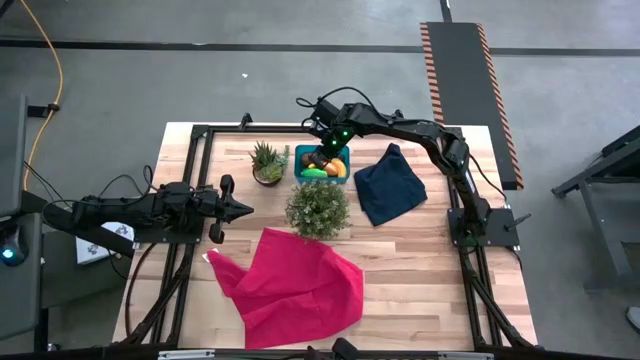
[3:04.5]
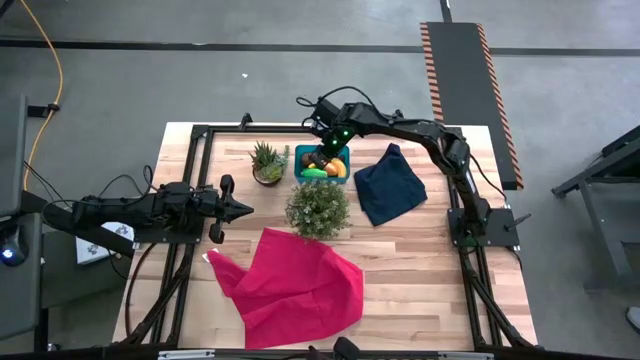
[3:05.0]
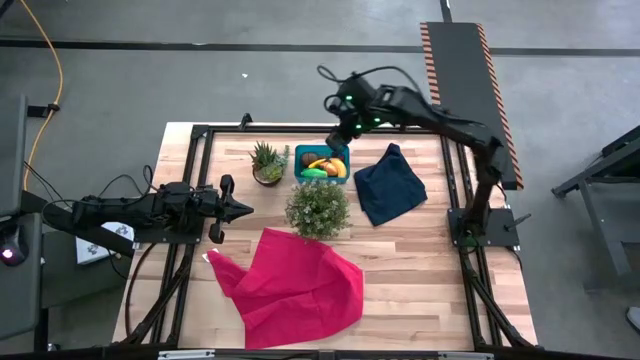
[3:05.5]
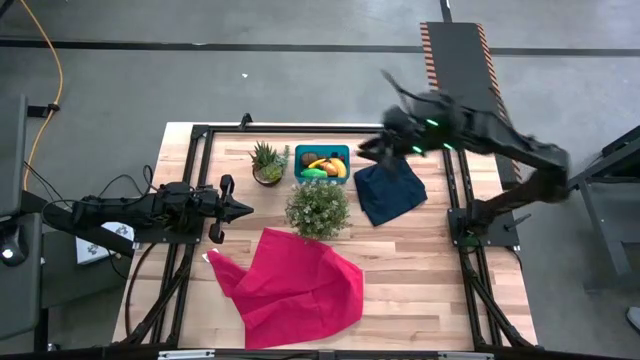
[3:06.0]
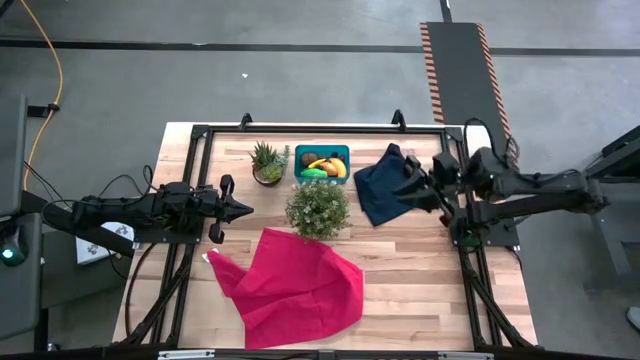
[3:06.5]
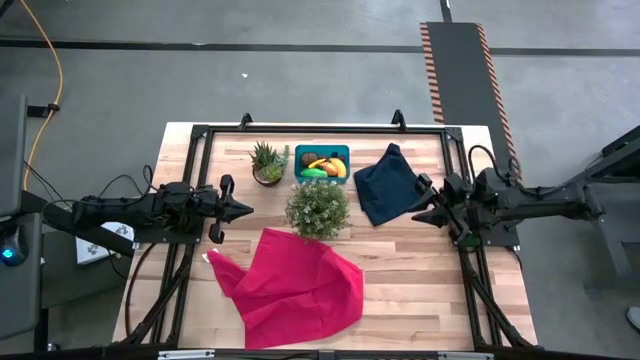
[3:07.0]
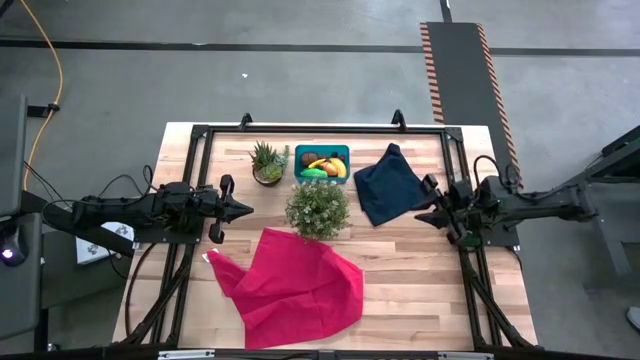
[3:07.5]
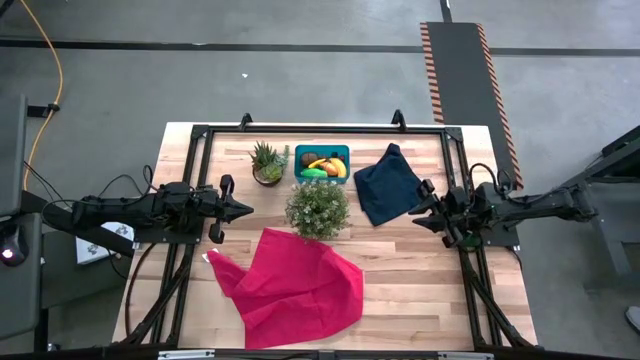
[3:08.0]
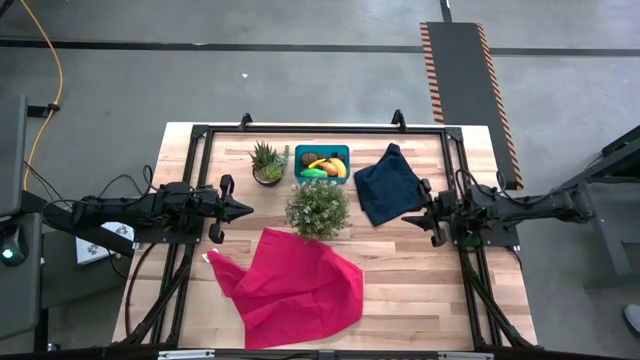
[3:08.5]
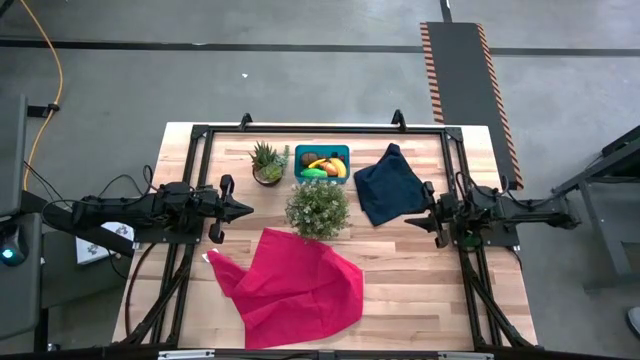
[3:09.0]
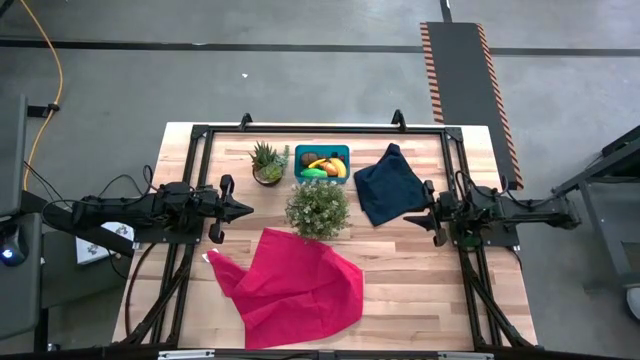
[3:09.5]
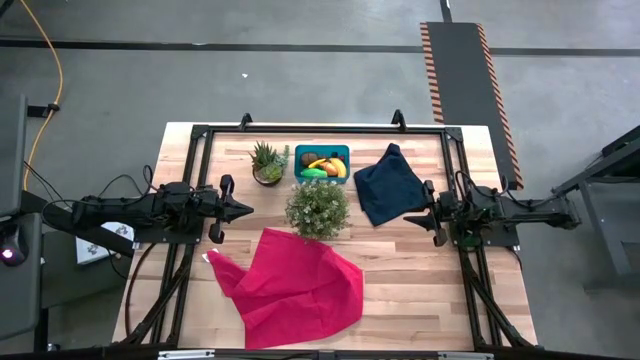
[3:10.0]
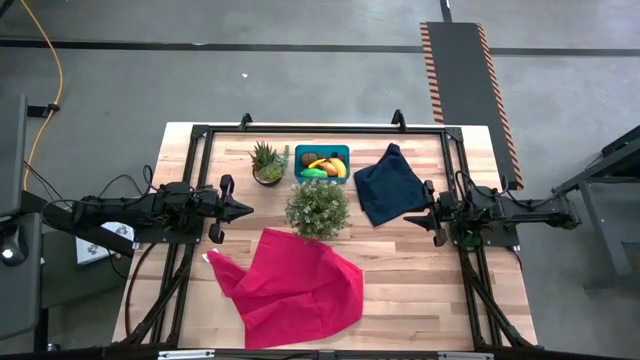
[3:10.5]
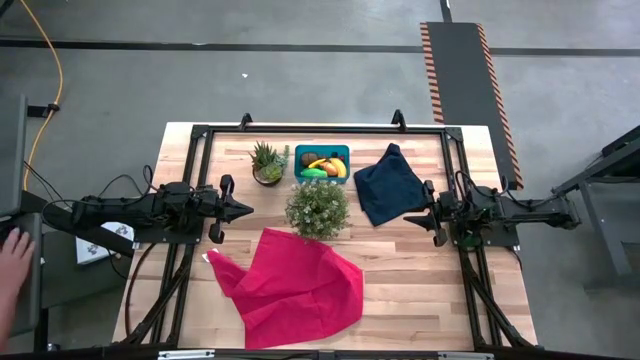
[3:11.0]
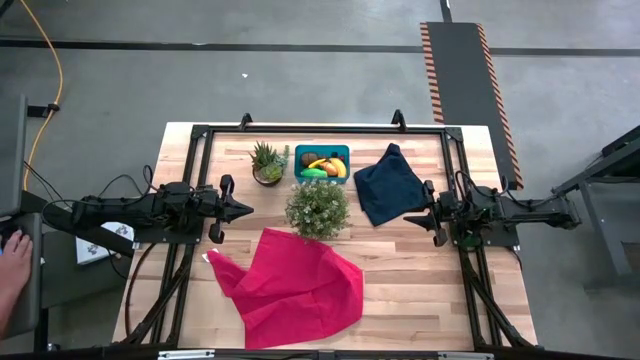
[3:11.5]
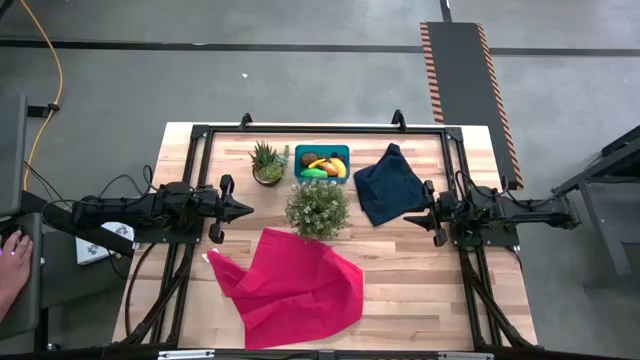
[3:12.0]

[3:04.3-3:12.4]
Task: Pick and placing Produce into tupperware
Return to Home Position

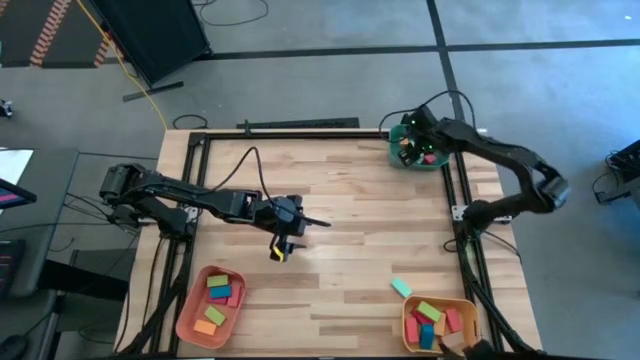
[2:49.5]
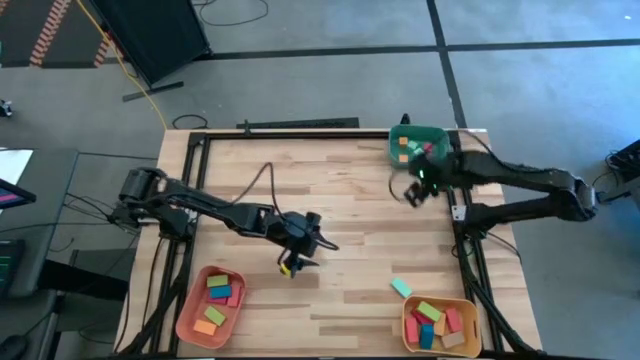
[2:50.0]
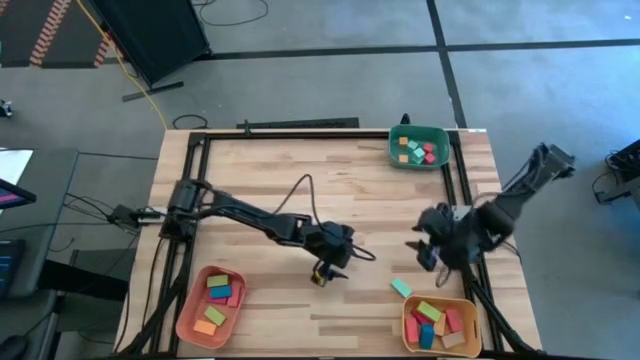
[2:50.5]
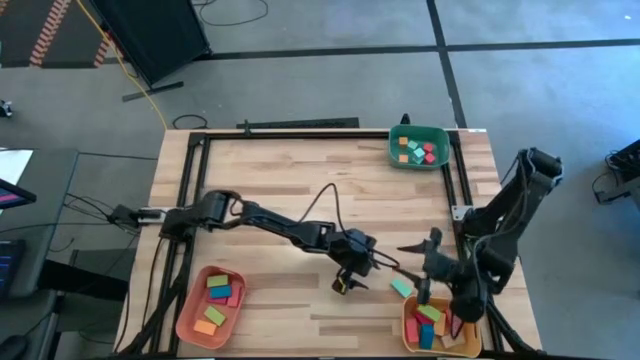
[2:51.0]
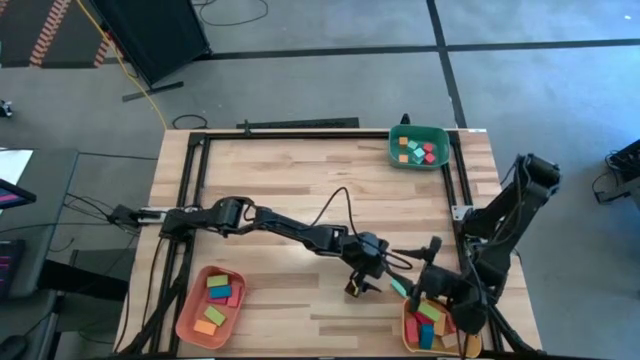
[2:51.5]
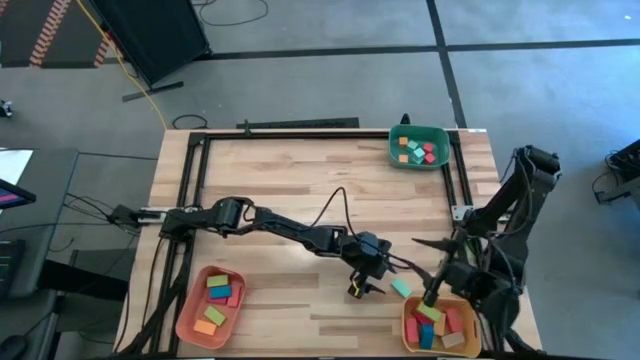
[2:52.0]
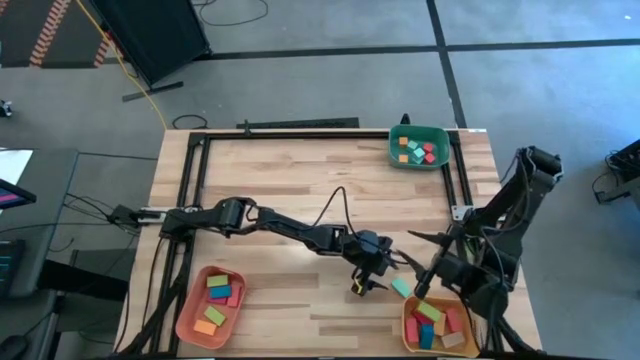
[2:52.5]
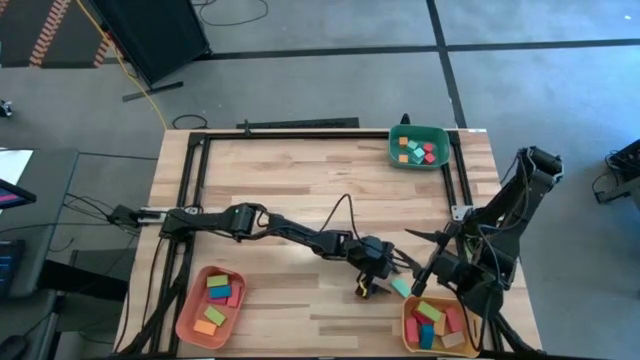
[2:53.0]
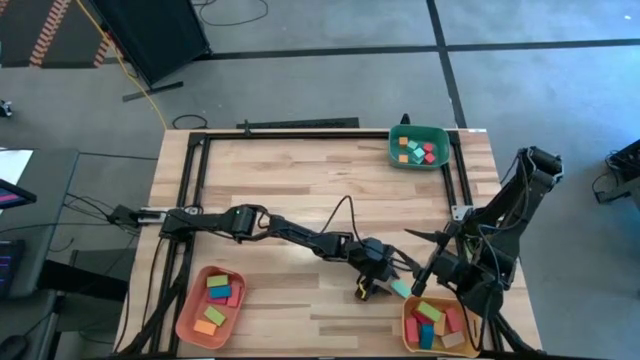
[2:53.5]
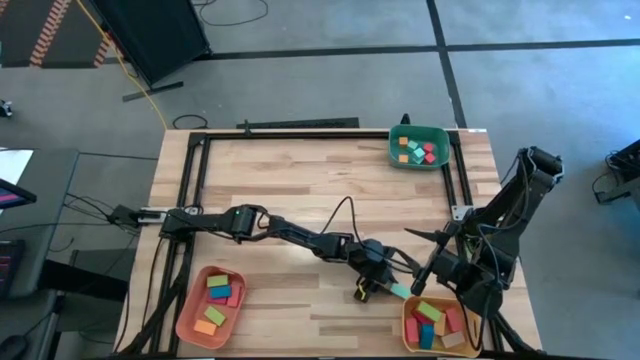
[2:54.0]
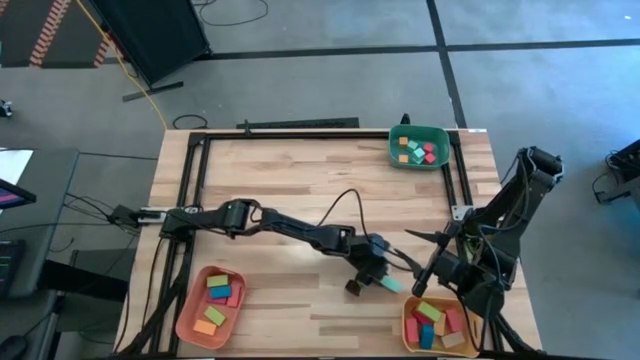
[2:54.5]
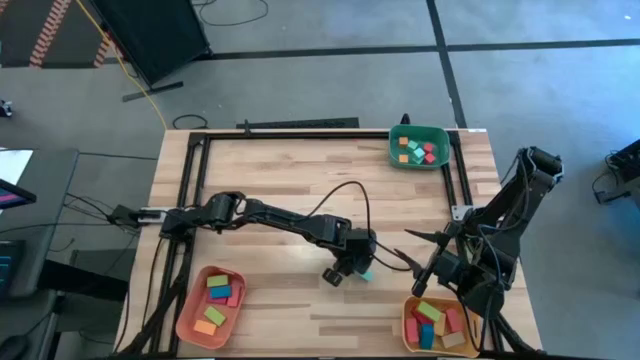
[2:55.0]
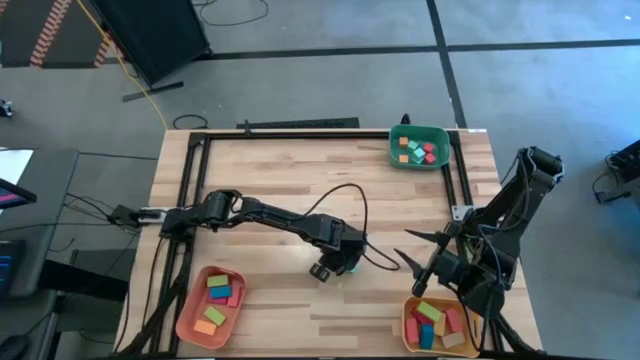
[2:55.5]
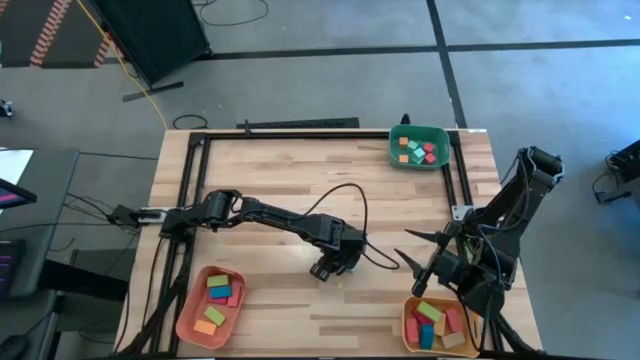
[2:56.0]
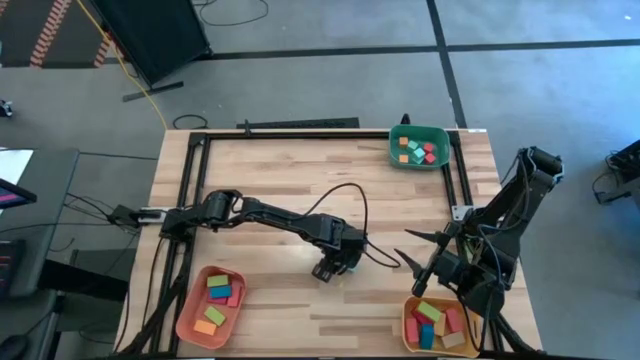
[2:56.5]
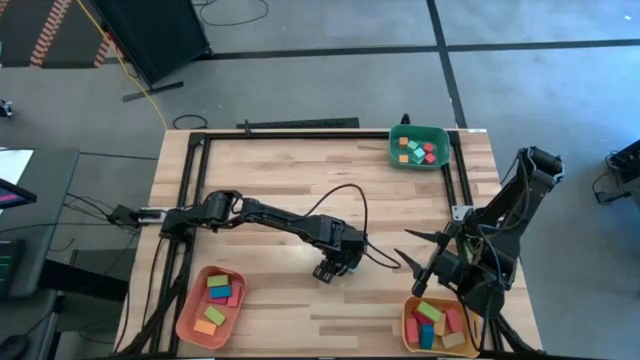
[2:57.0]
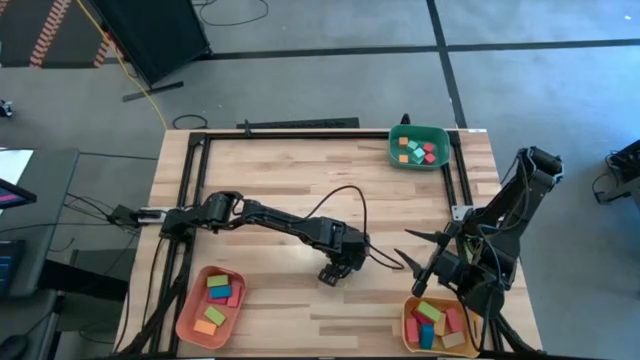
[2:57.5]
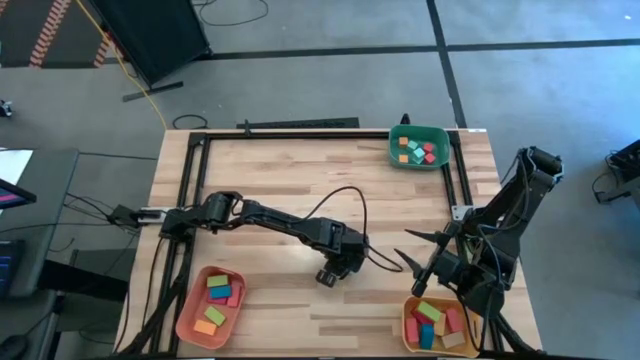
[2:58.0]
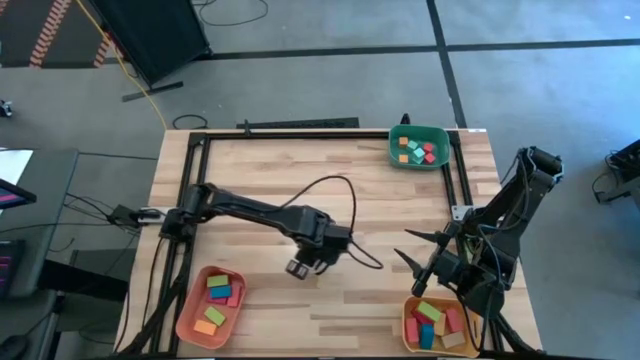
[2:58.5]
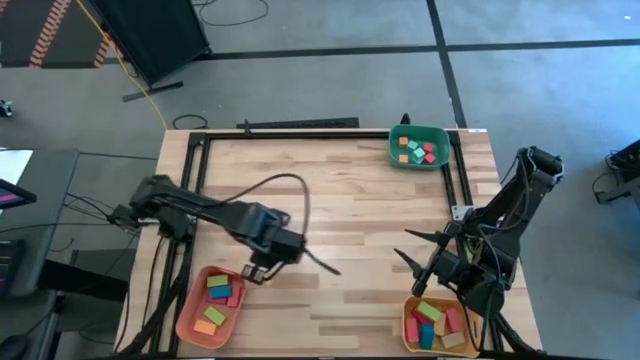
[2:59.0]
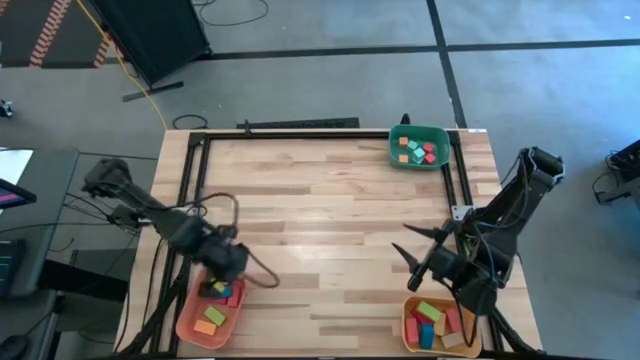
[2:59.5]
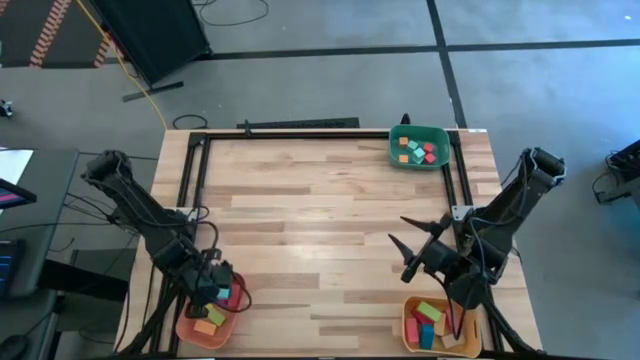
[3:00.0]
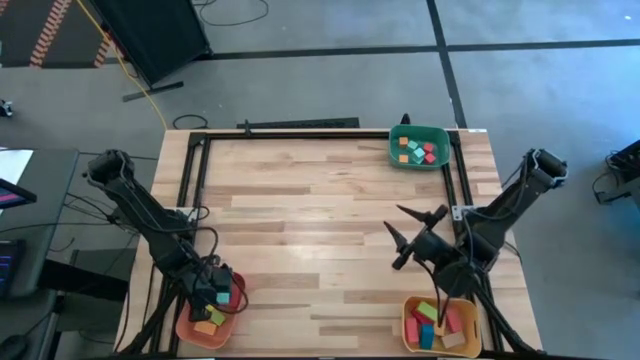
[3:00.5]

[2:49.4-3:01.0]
Task: Sort blocks by size
Put the medium blue rectangular block into the orange bin
